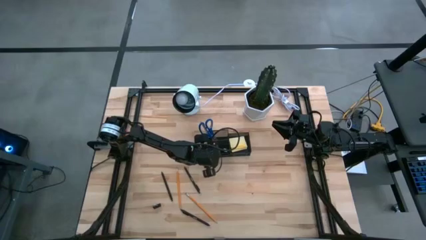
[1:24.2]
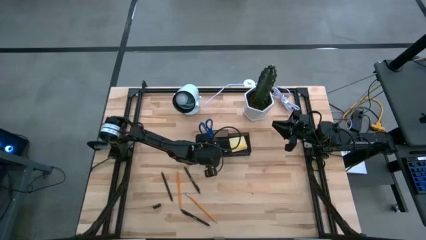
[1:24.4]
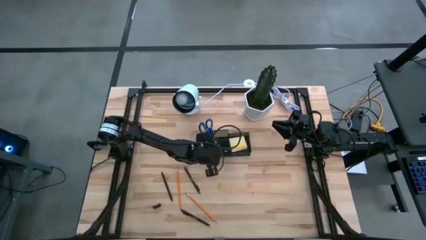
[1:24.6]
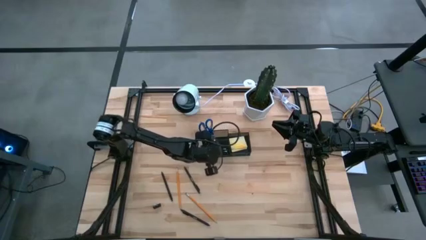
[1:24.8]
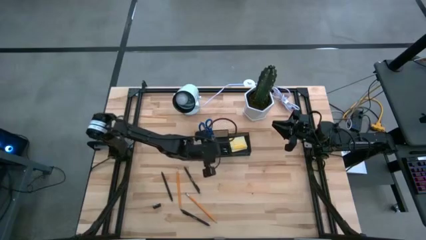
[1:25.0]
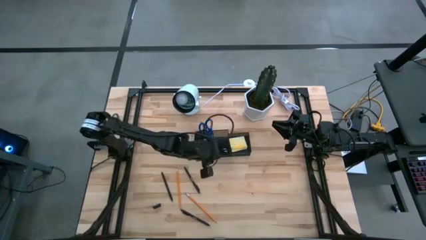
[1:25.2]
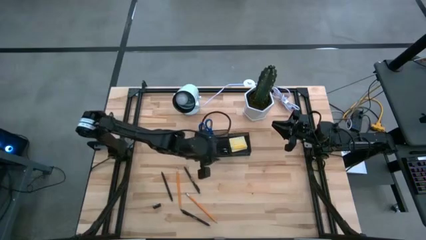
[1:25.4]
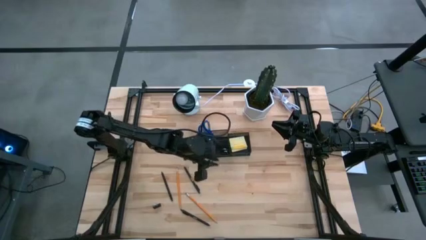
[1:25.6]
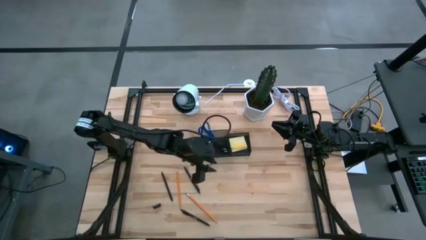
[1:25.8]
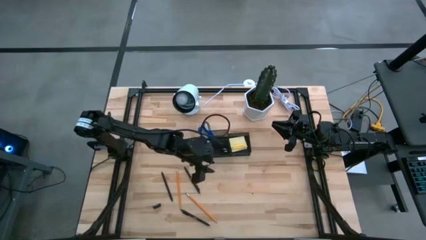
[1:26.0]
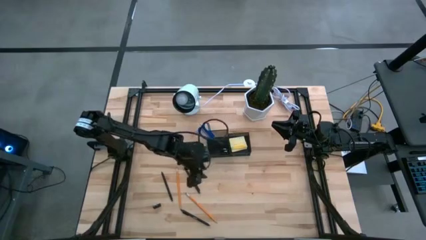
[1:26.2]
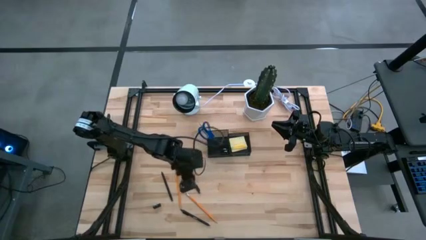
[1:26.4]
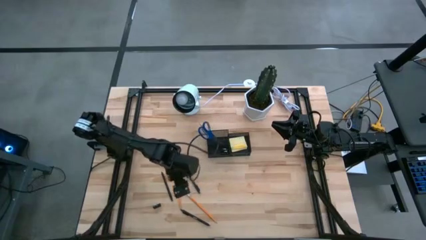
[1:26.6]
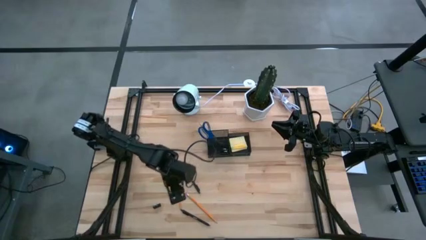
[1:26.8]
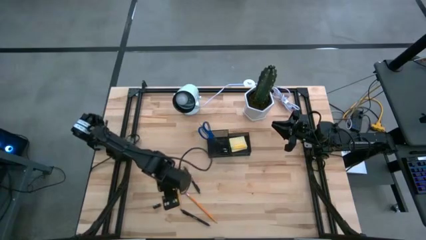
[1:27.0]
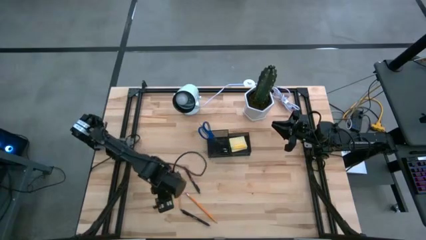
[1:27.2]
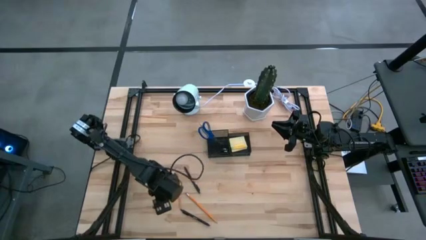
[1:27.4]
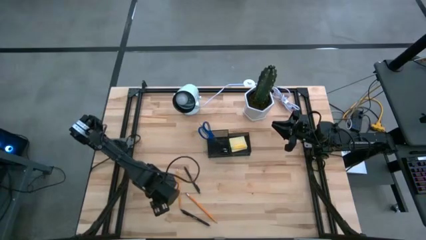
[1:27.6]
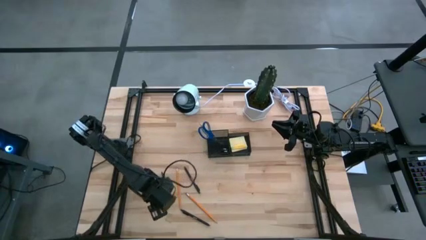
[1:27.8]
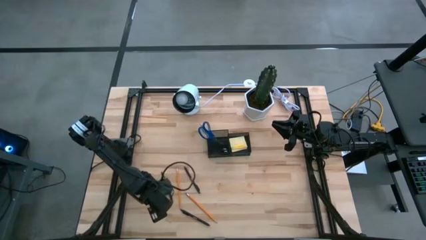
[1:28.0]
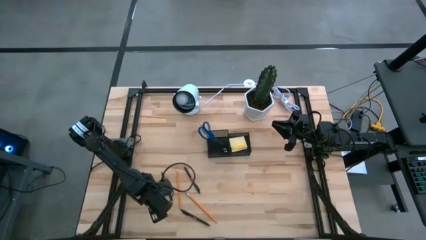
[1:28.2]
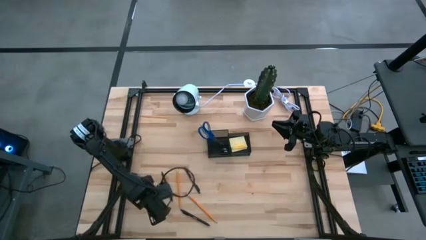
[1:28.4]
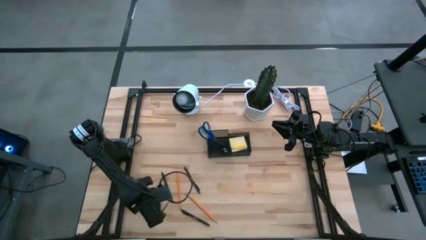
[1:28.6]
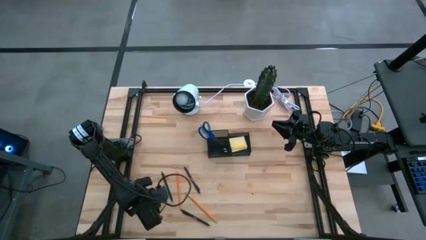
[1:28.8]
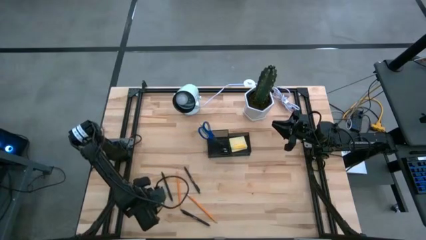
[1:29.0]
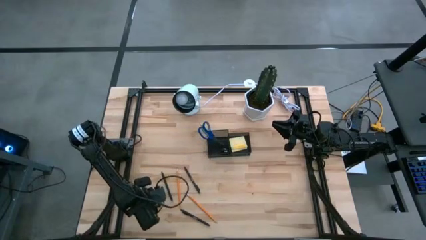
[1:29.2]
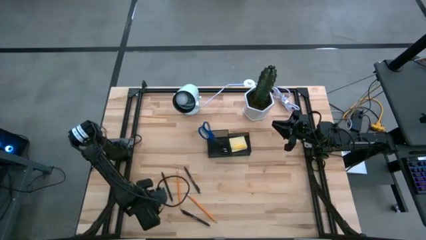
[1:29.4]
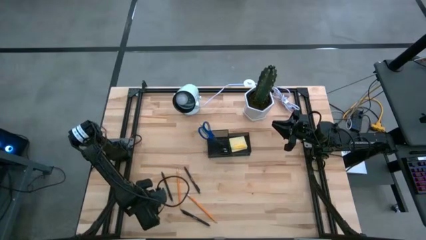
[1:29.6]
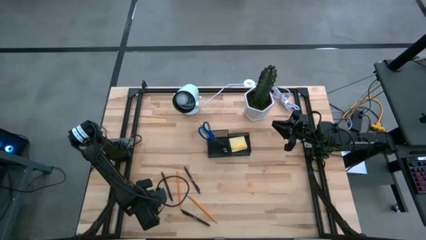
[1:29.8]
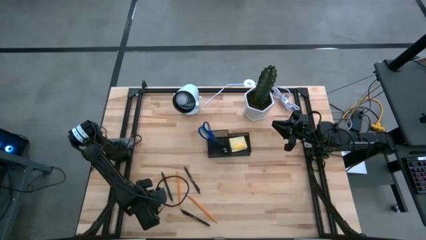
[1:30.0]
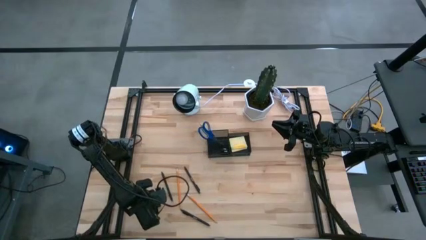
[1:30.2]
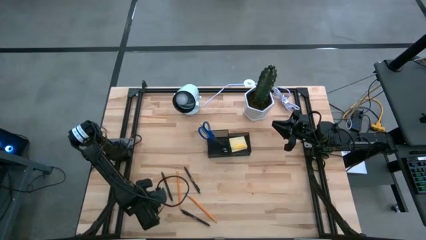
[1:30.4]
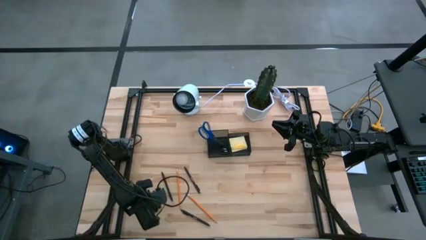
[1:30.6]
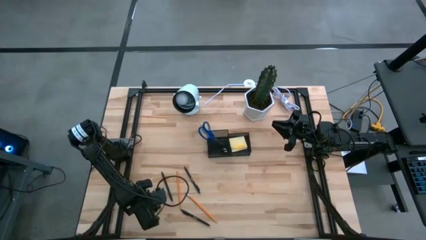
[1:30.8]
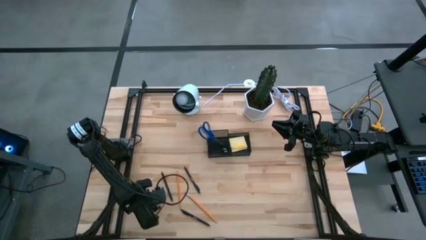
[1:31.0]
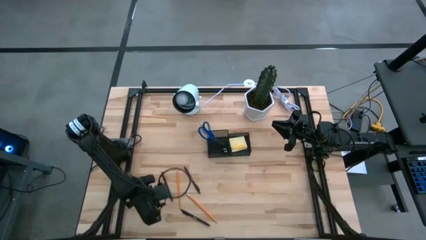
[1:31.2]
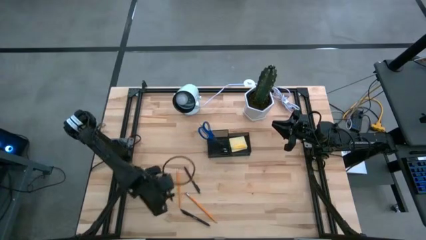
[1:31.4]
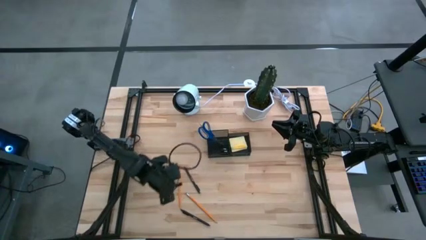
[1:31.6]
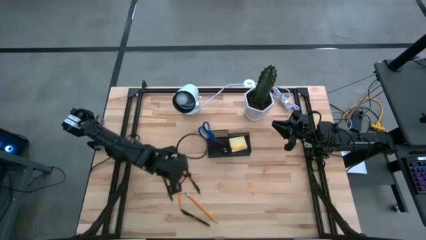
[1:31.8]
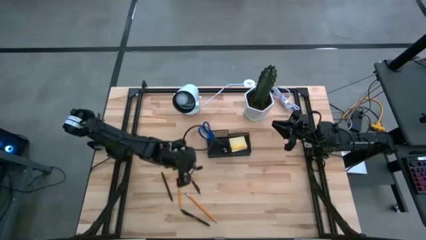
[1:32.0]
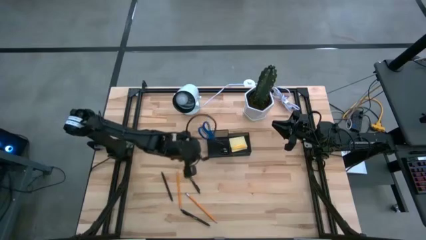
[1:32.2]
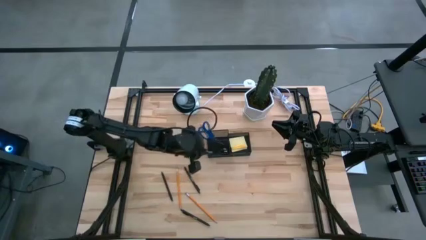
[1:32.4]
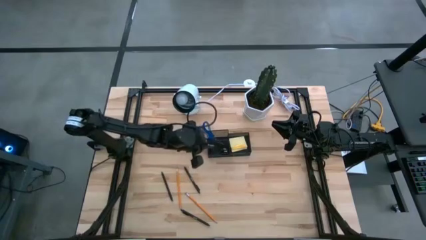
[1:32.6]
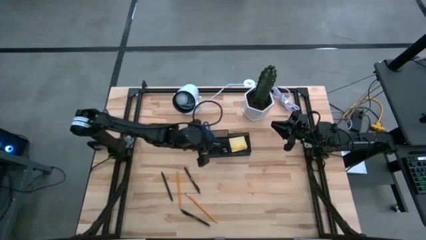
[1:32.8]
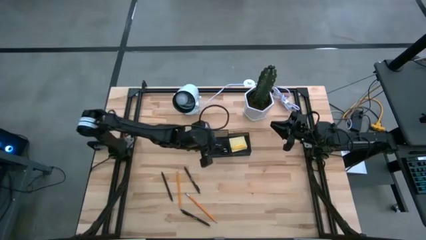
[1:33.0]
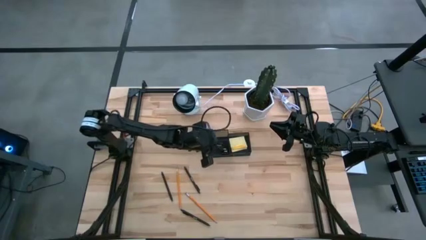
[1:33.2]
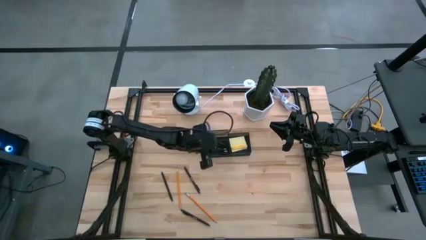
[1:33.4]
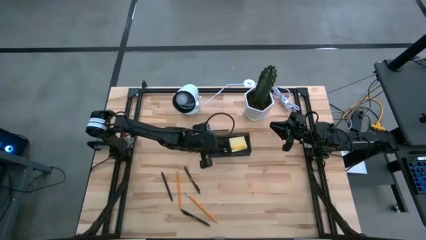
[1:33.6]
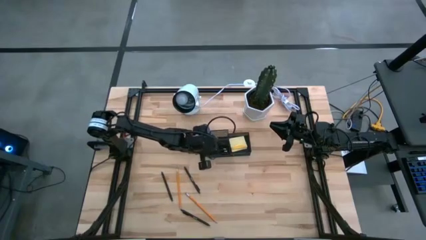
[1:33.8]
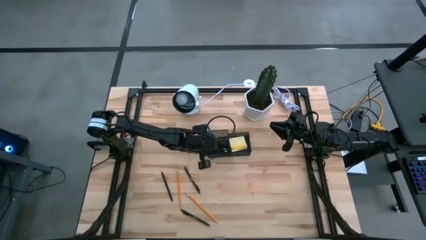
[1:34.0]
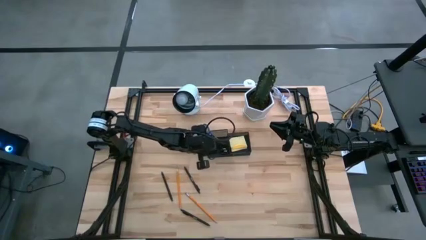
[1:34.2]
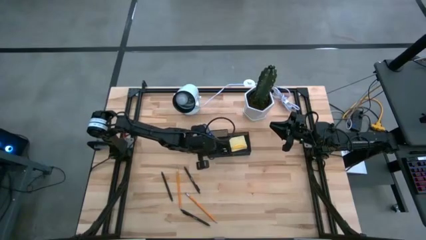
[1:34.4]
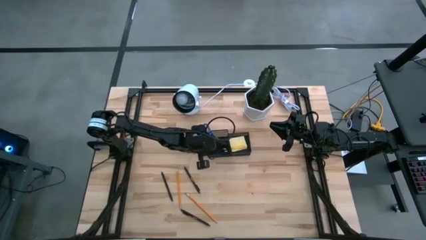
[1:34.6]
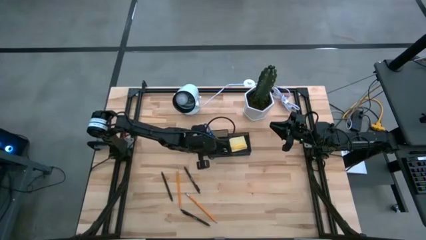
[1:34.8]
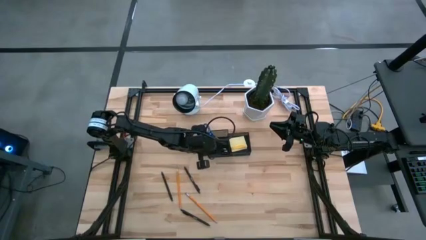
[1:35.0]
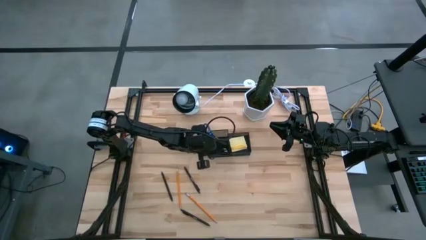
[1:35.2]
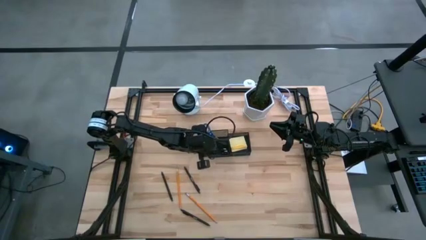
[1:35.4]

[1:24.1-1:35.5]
Task: Pick and place office supplies into organizer
Put the black binder clip into the black desk organizer
